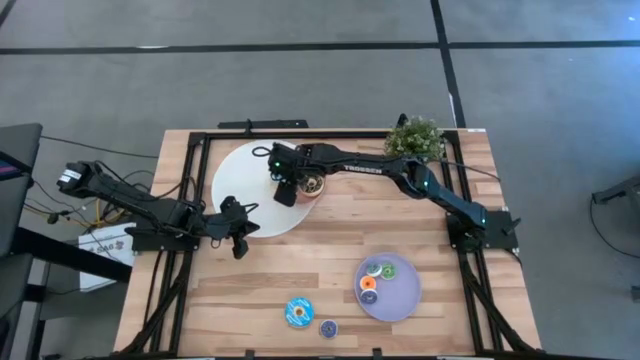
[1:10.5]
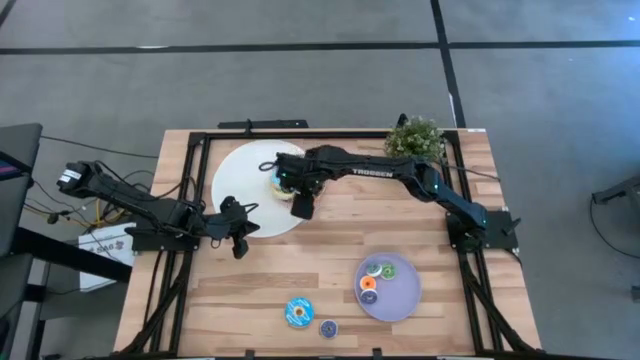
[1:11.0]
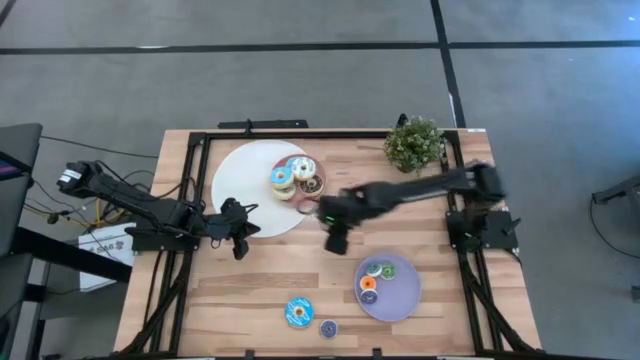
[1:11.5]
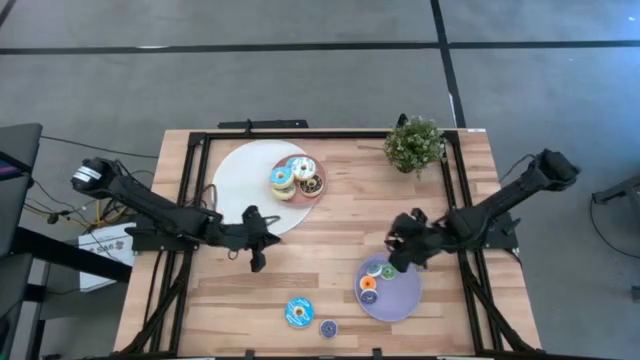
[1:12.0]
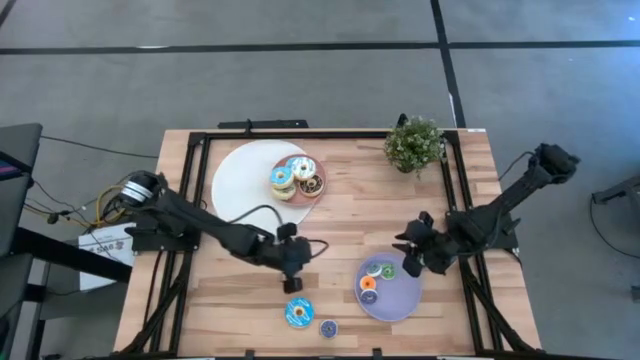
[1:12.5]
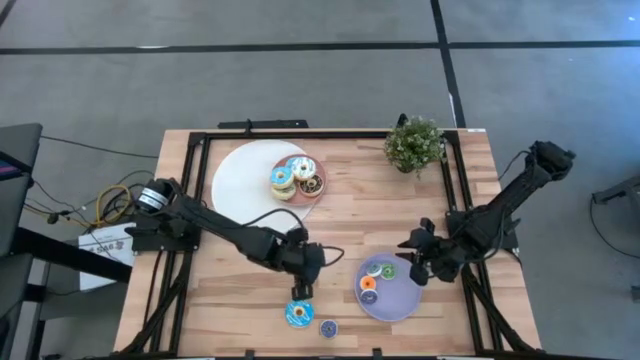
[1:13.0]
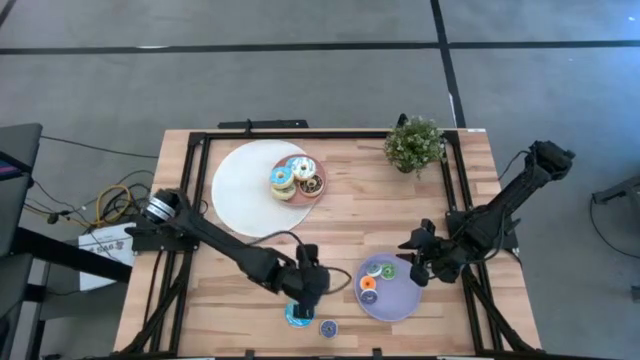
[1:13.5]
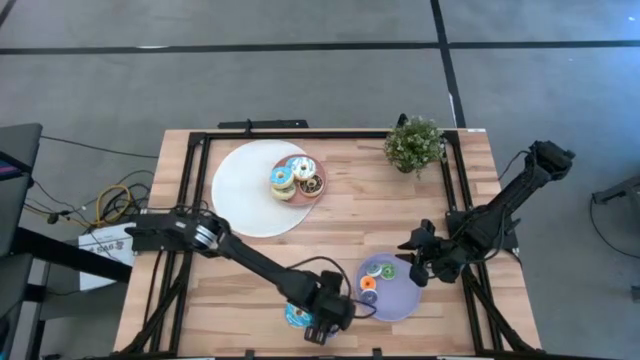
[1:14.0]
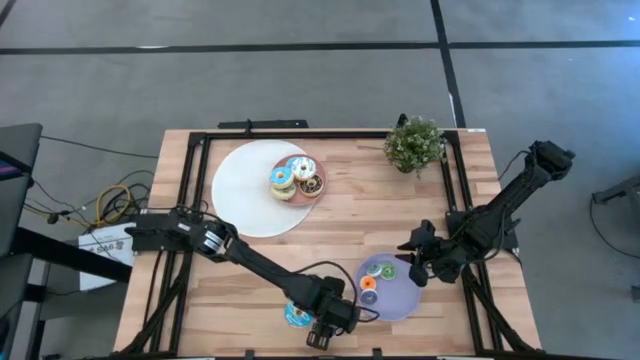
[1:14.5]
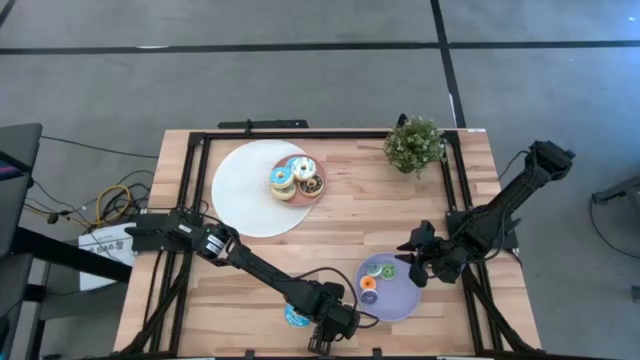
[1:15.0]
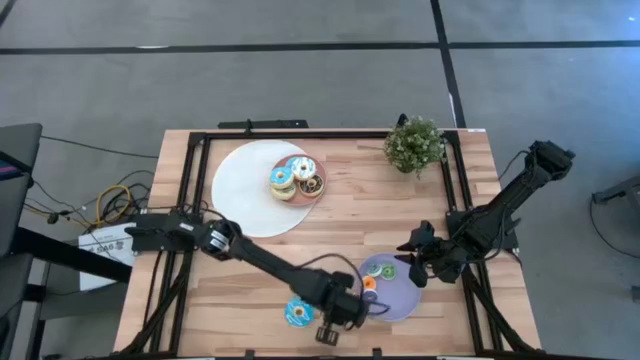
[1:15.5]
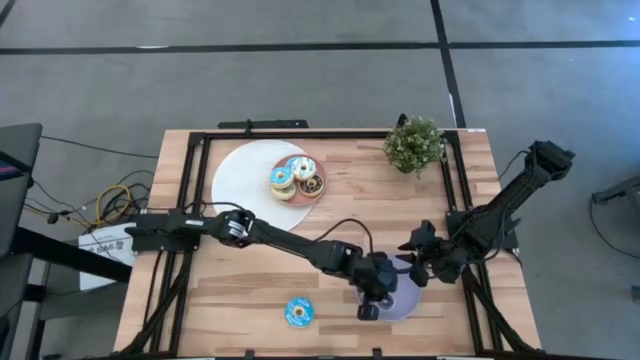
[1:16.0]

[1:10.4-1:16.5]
Task: Pick & Place donuts
Put the small blue donut on the purple plate

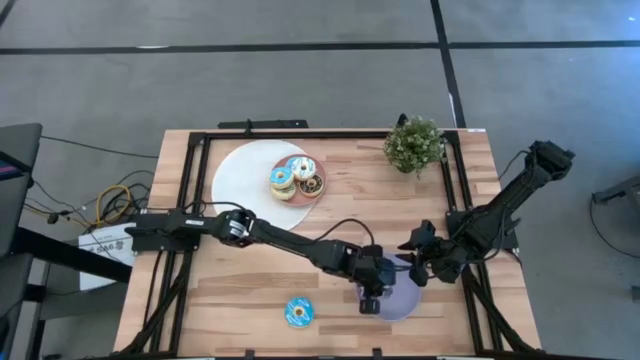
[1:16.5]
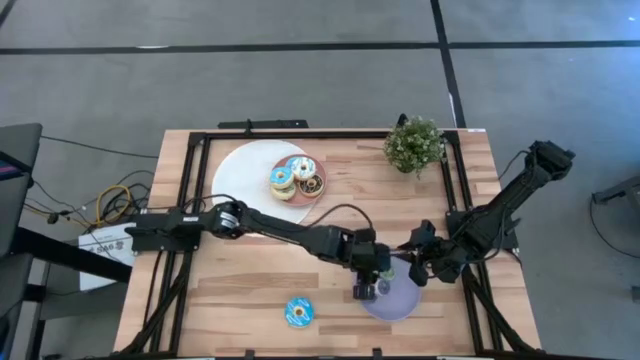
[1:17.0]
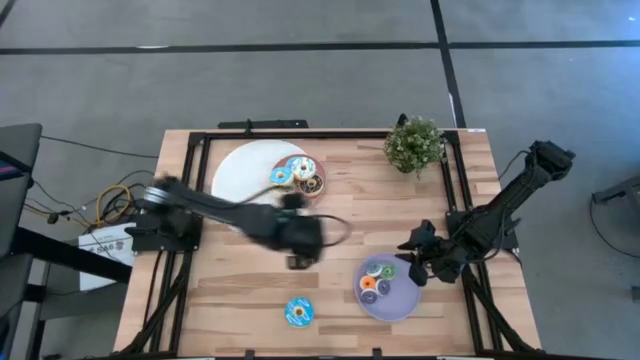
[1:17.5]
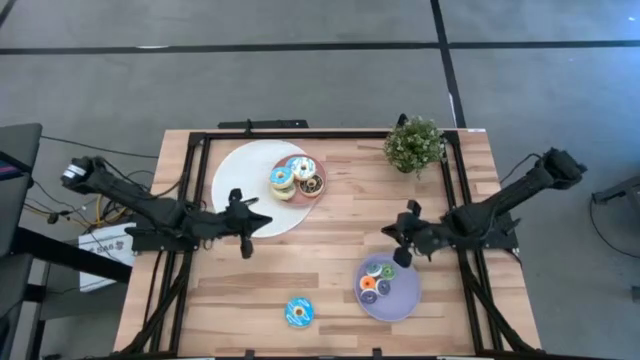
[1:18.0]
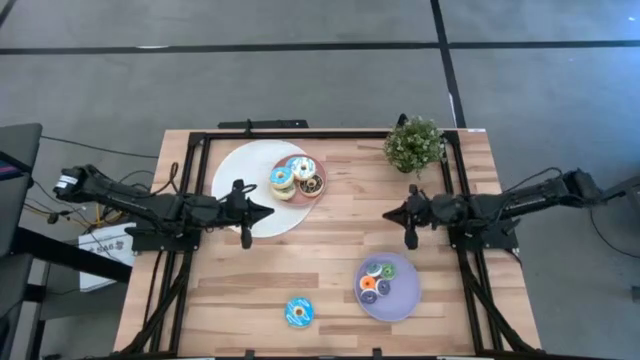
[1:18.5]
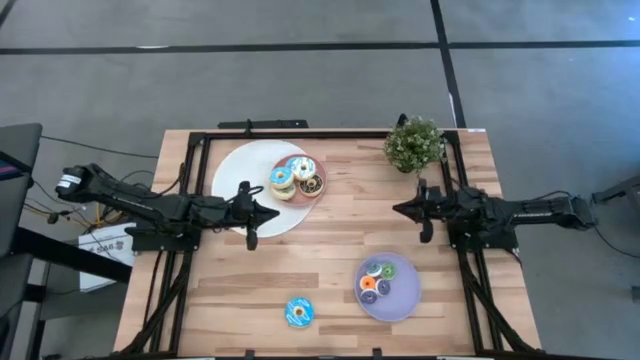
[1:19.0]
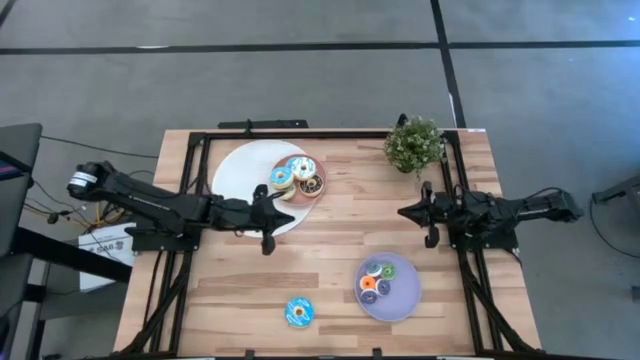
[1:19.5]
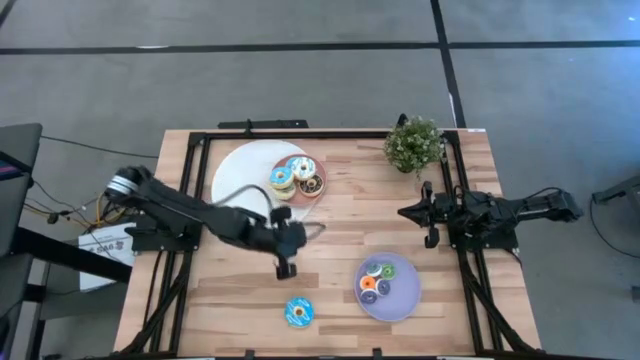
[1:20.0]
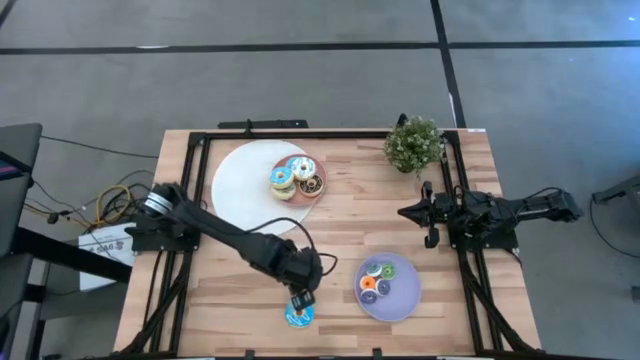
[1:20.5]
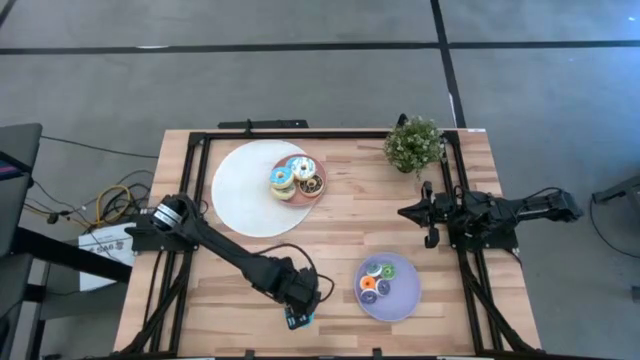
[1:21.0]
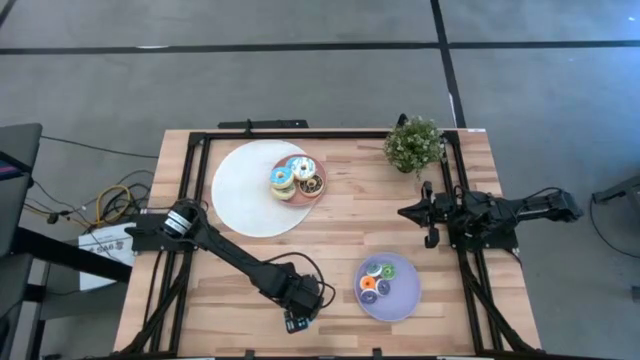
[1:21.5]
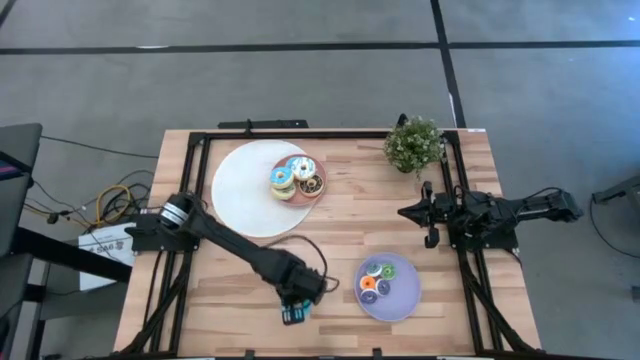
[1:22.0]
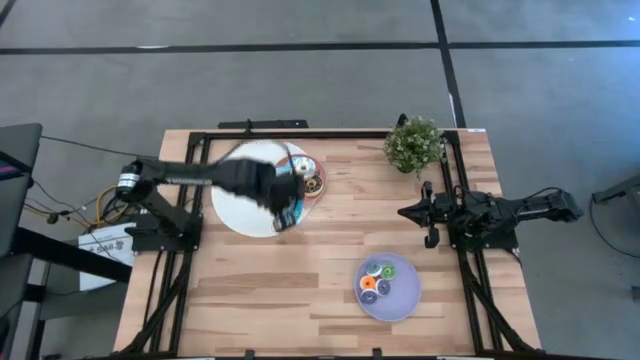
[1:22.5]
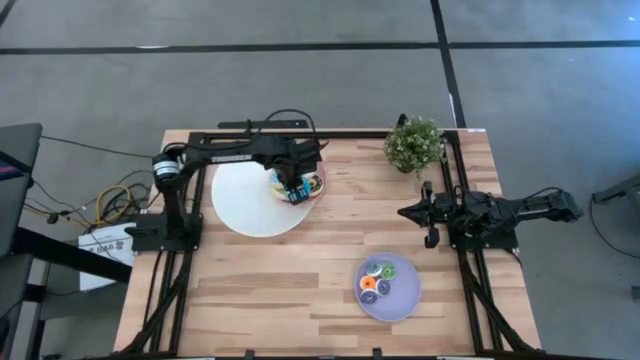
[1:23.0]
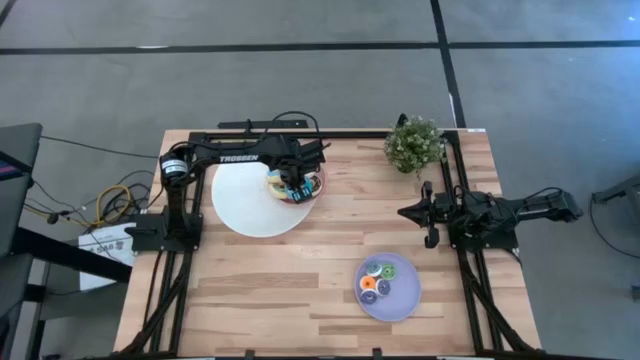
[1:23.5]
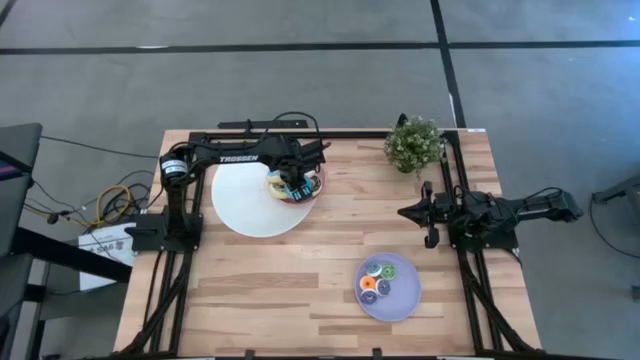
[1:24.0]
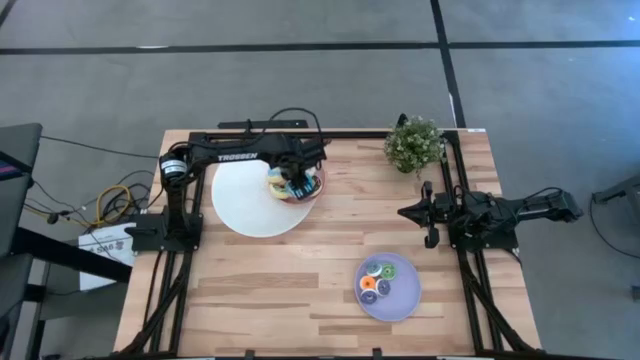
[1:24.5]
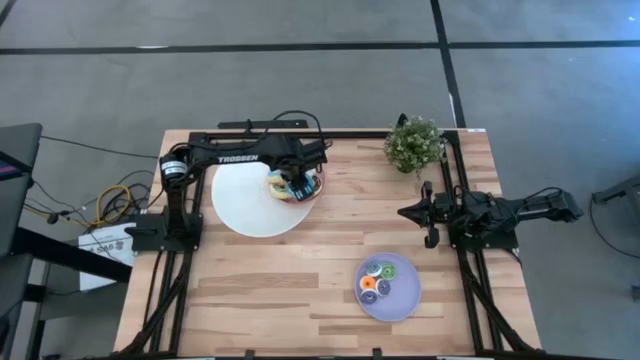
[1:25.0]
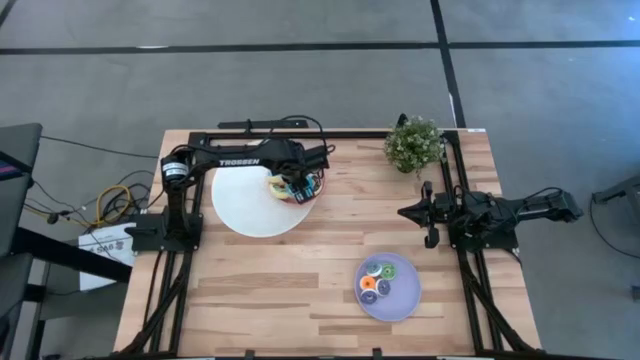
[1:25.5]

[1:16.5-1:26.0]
Put the large blue donut on the pink plate

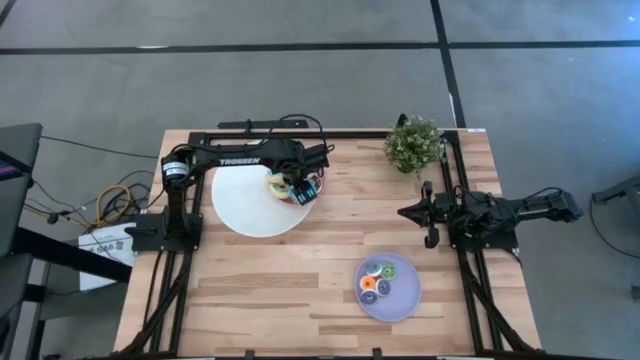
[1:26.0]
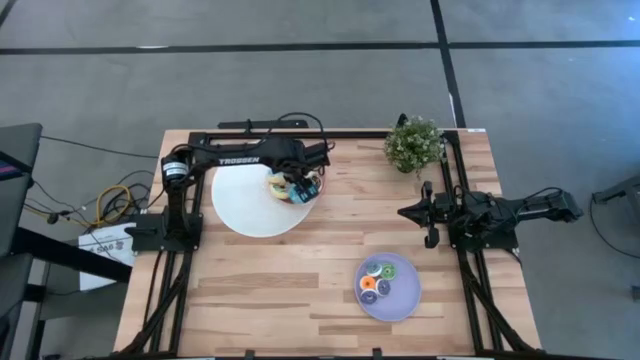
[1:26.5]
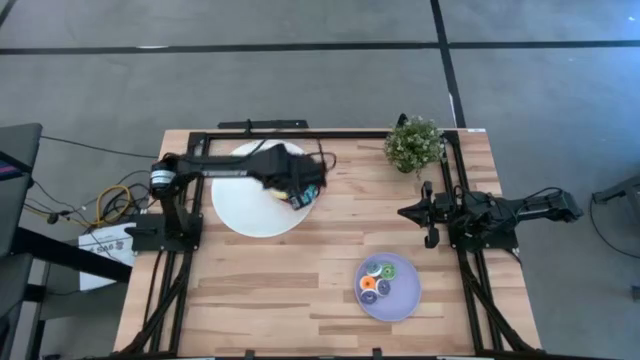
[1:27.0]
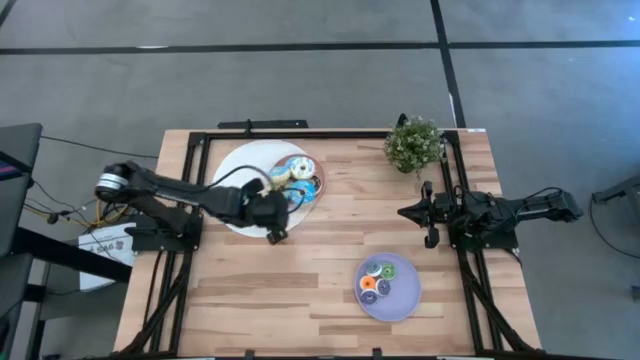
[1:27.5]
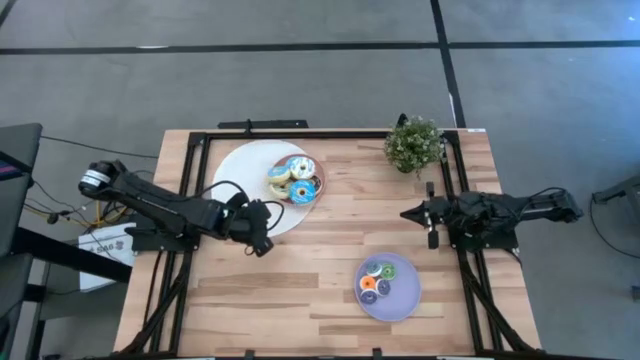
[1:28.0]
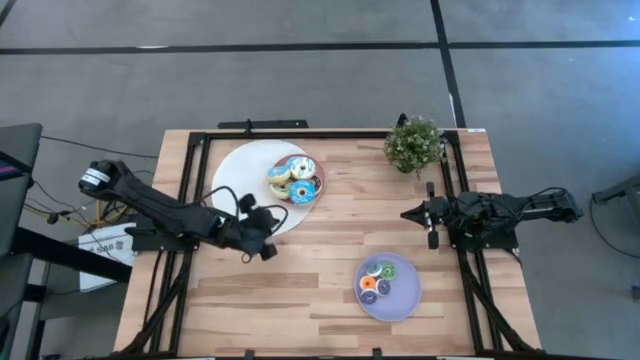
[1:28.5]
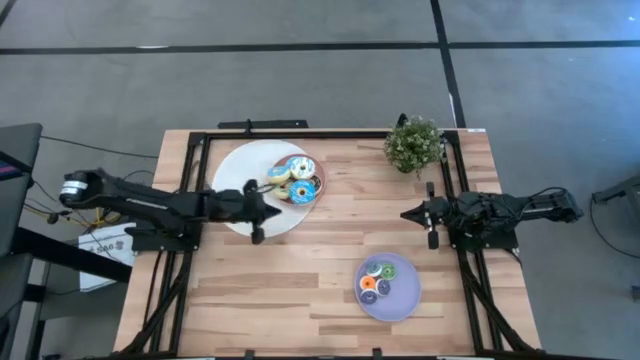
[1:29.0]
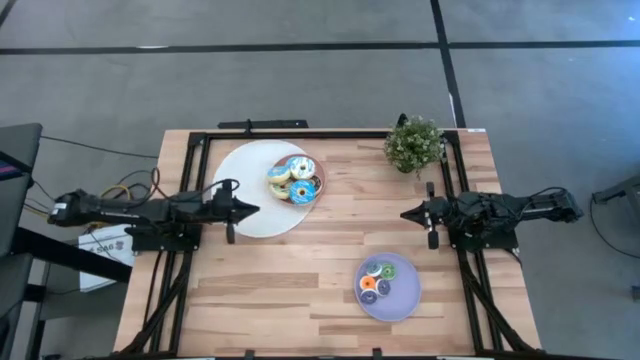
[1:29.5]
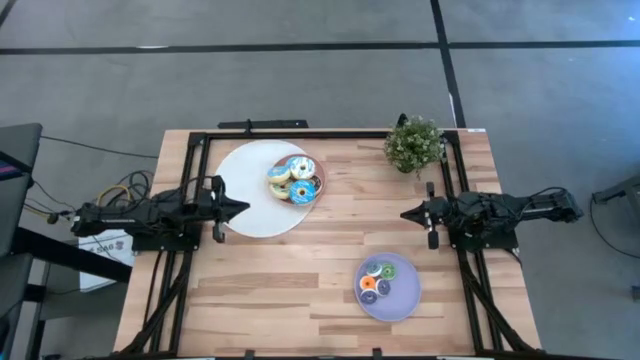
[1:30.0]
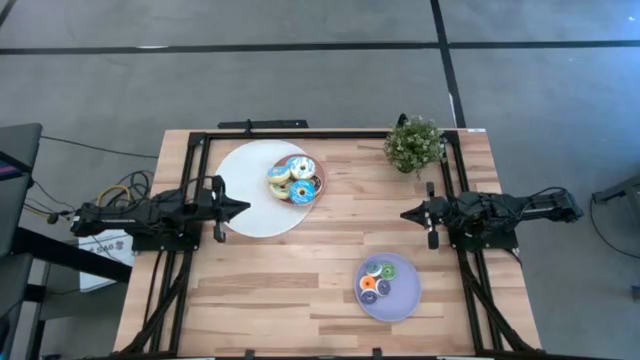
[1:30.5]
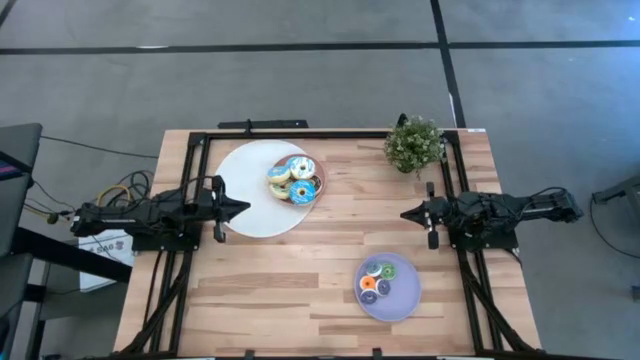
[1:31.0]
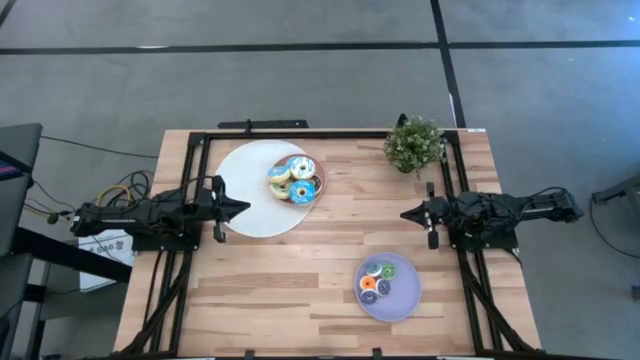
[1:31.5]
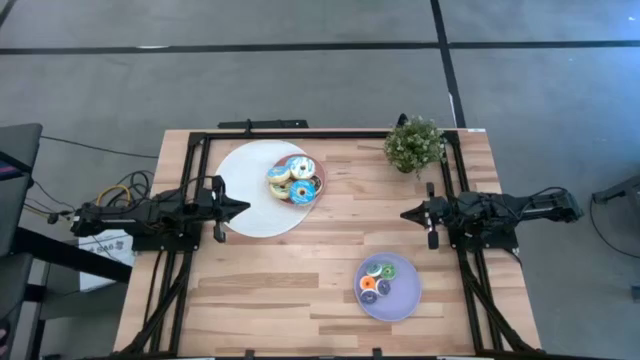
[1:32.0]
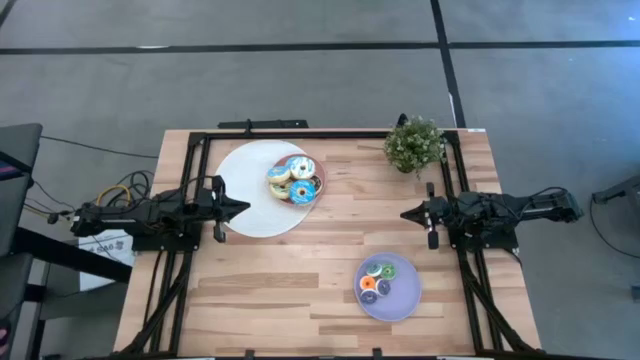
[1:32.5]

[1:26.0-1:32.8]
Return to Home Position
